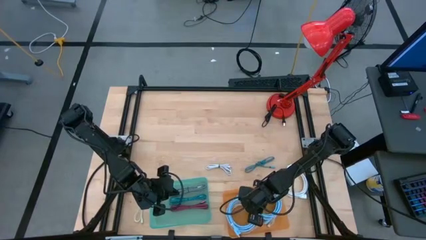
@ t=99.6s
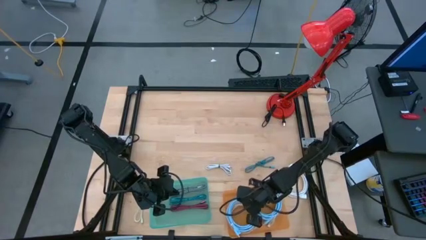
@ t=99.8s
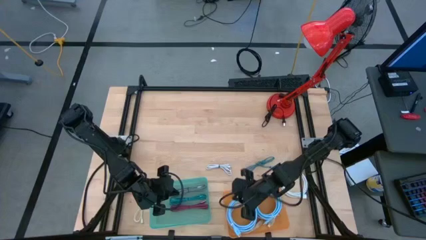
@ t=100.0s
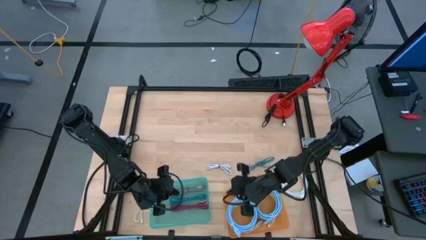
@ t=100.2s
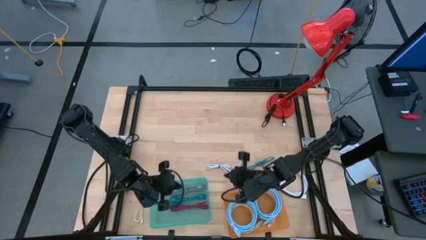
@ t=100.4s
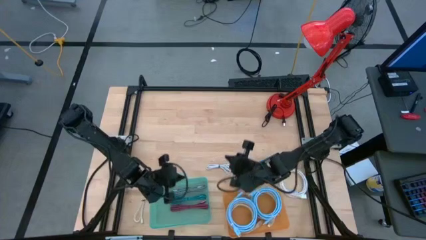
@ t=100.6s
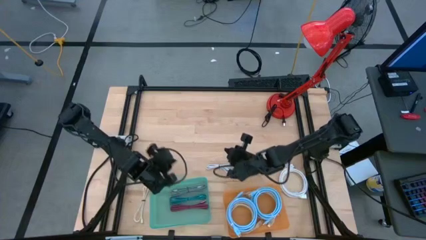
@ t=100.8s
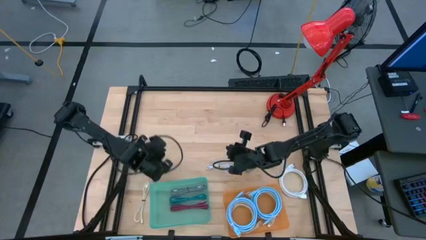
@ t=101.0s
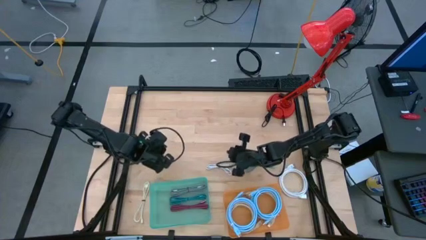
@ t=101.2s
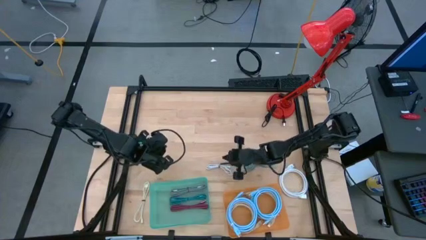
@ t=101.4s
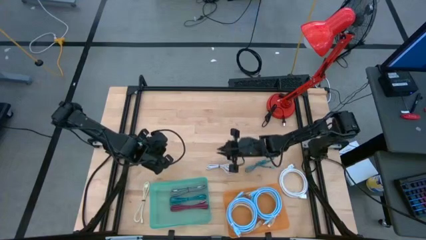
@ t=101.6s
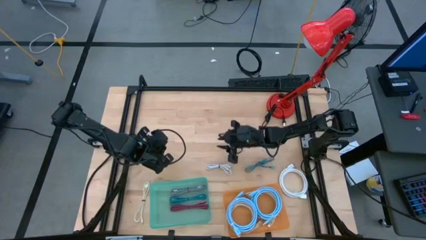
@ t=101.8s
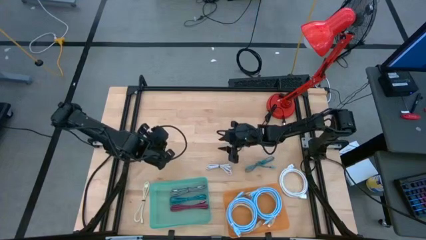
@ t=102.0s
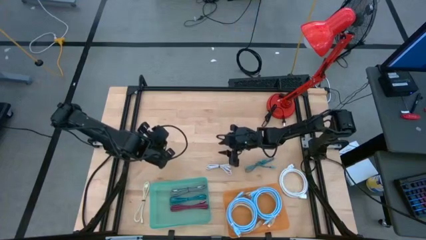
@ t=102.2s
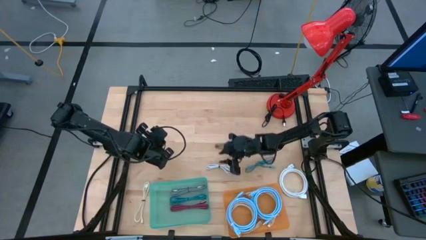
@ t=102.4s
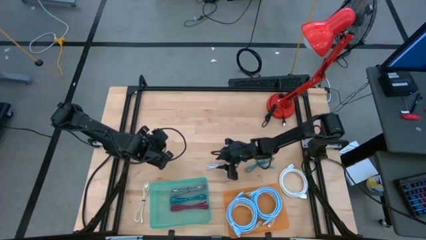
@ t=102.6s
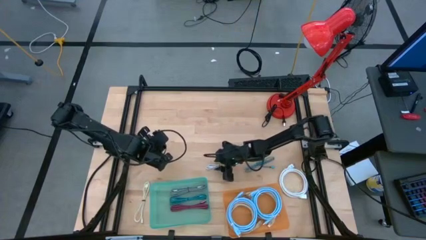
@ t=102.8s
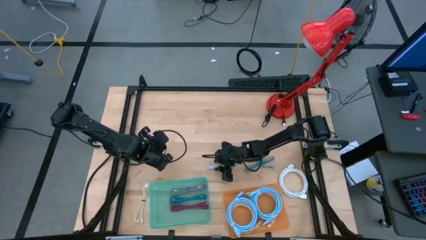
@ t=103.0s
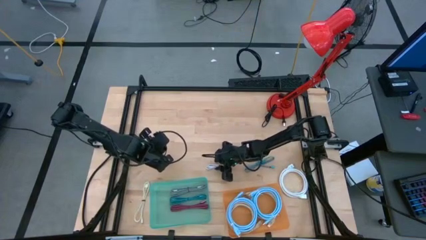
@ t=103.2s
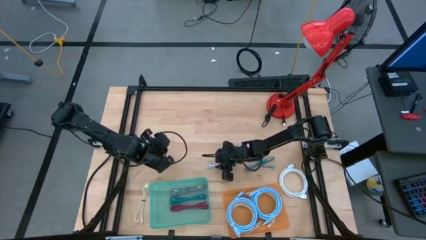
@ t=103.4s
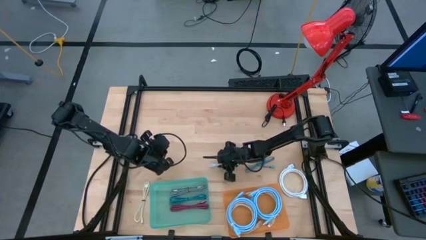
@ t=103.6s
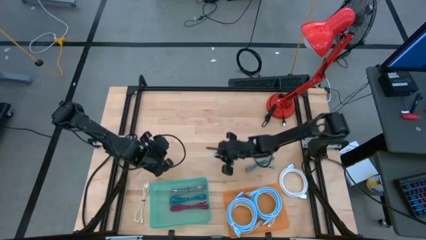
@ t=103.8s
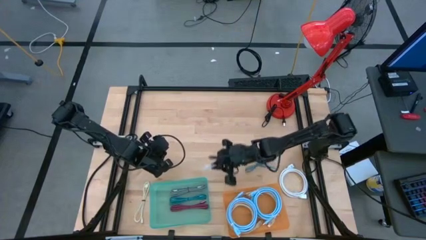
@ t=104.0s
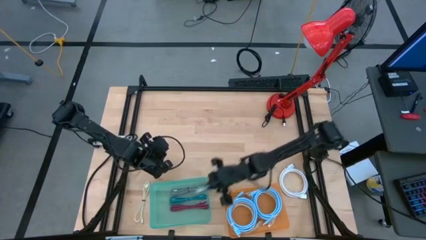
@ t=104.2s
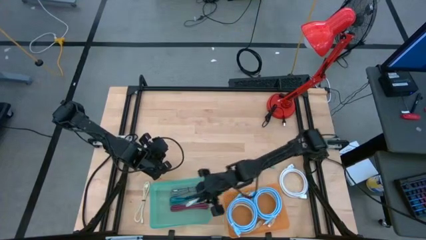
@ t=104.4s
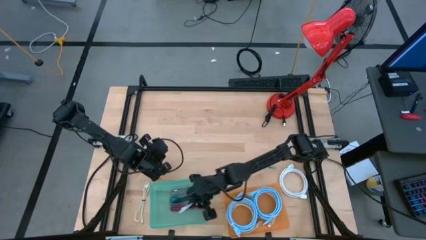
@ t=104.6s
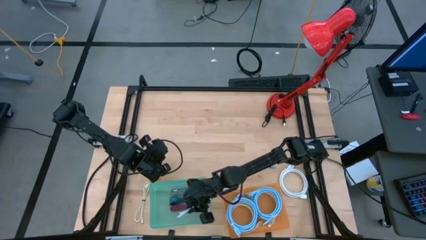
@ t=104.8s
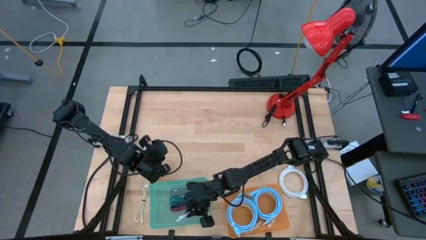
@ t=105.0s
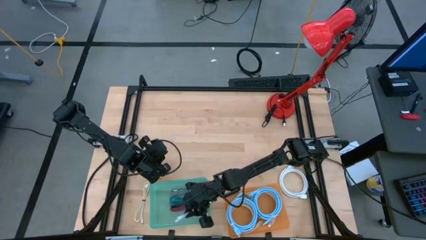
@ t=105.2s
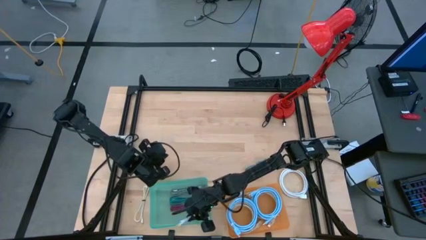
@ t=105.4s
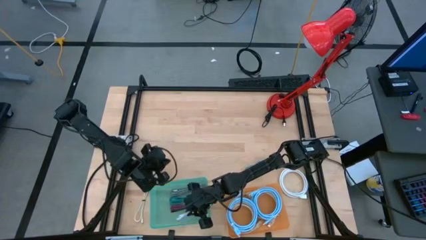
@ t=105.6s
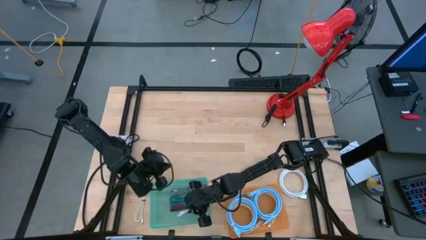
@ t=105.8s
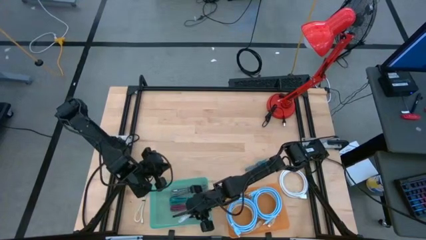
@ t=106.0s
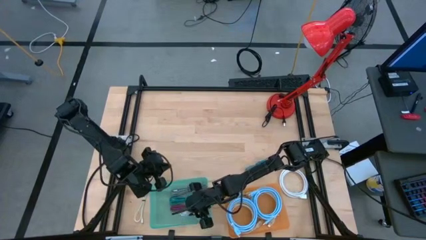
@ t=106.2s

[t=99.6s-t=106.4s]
Task: Pick & Place USB Port
Put the white charger cable into the green bin

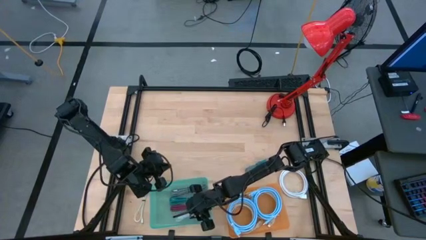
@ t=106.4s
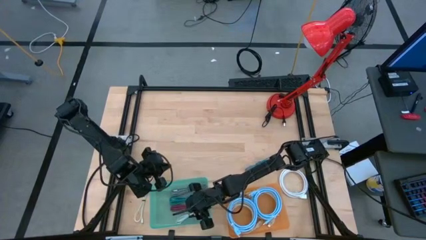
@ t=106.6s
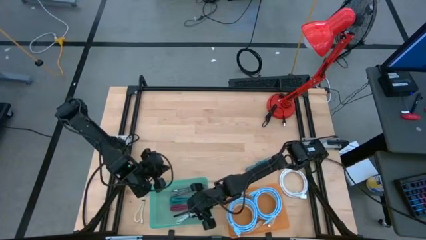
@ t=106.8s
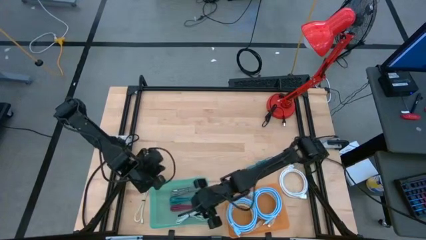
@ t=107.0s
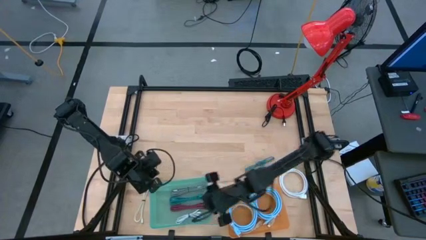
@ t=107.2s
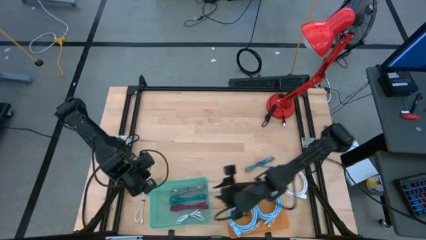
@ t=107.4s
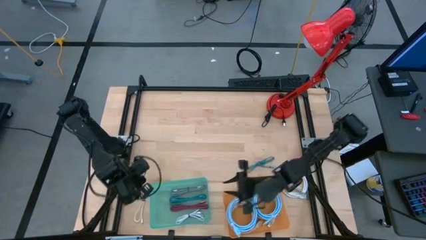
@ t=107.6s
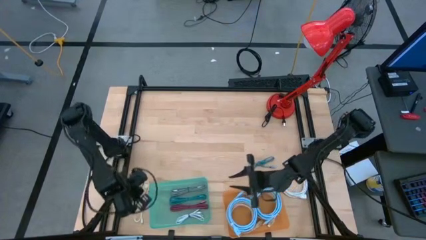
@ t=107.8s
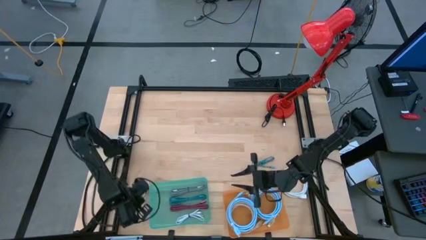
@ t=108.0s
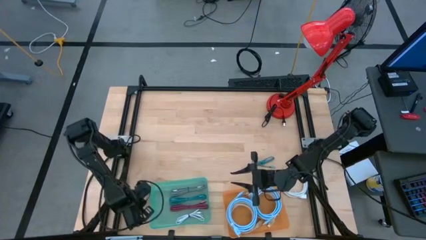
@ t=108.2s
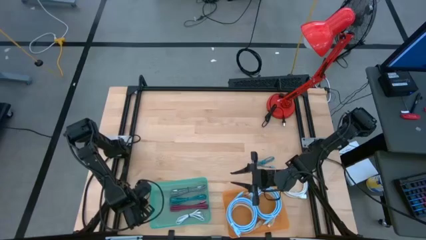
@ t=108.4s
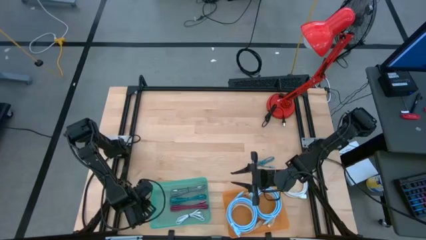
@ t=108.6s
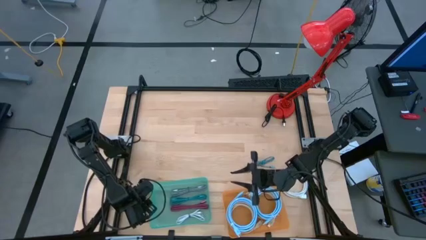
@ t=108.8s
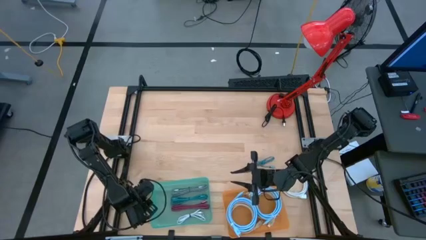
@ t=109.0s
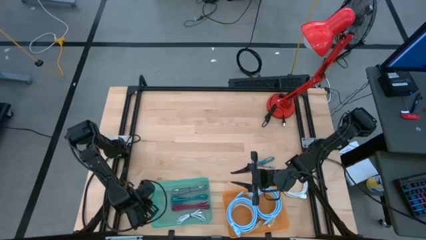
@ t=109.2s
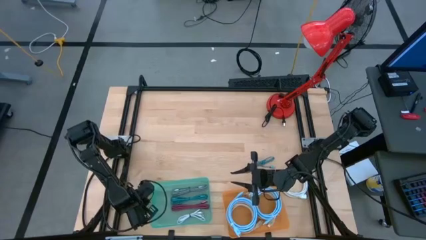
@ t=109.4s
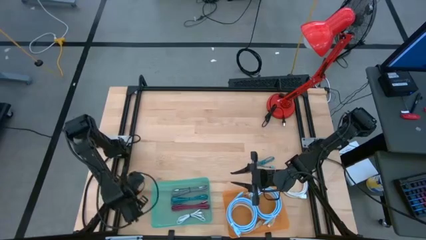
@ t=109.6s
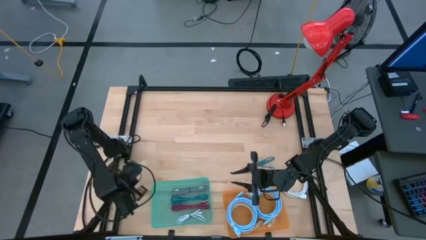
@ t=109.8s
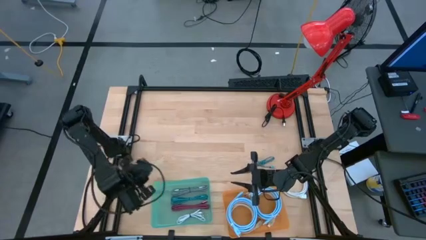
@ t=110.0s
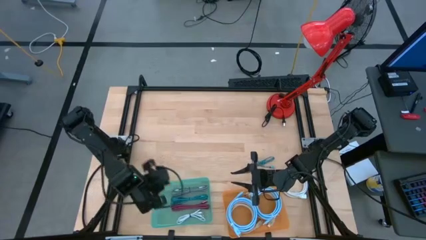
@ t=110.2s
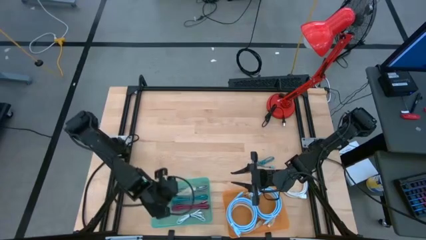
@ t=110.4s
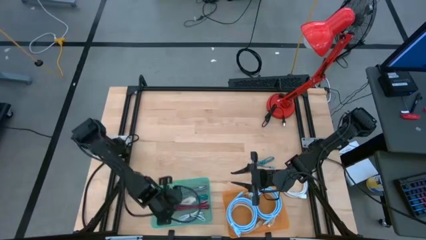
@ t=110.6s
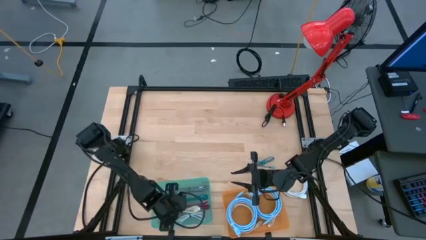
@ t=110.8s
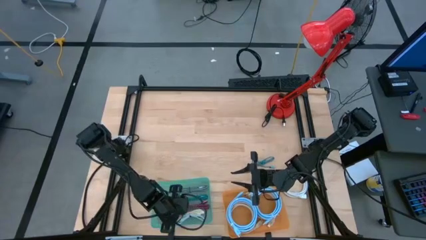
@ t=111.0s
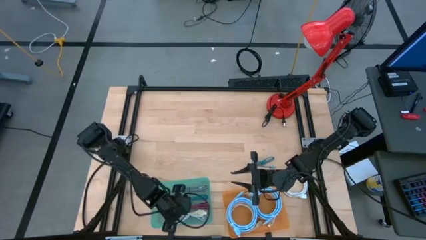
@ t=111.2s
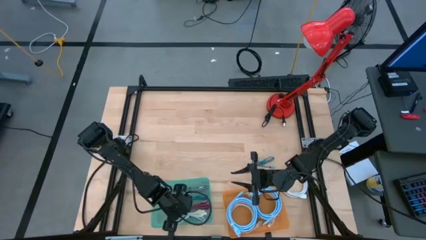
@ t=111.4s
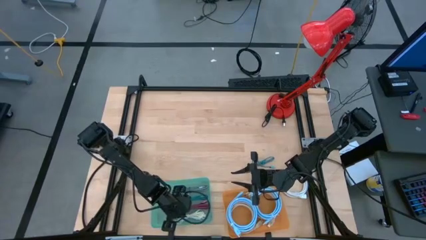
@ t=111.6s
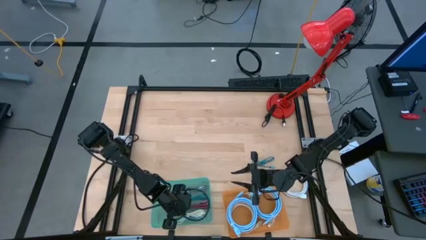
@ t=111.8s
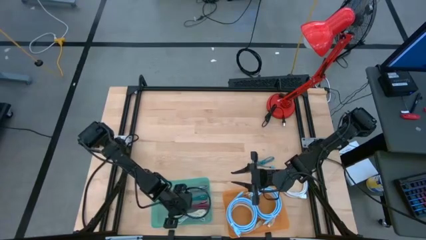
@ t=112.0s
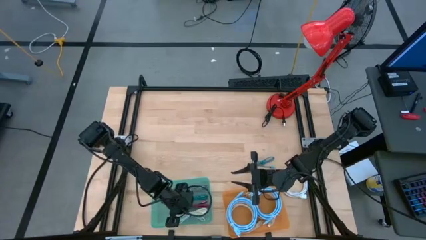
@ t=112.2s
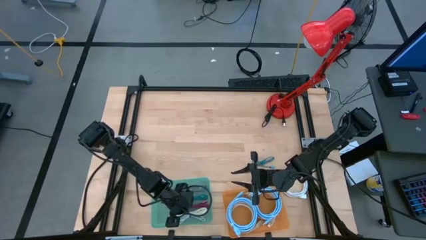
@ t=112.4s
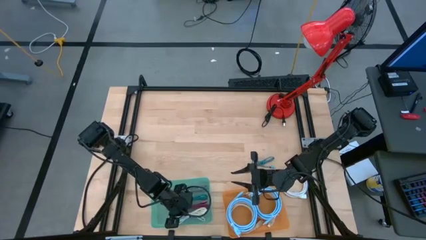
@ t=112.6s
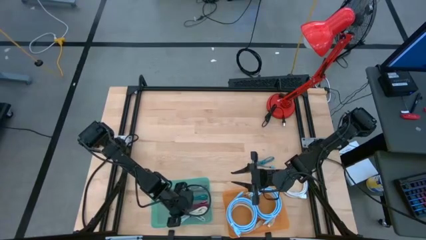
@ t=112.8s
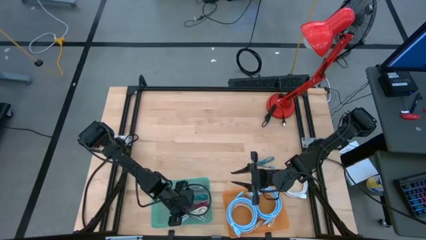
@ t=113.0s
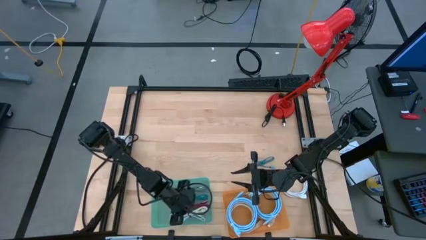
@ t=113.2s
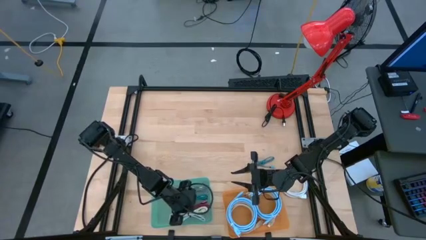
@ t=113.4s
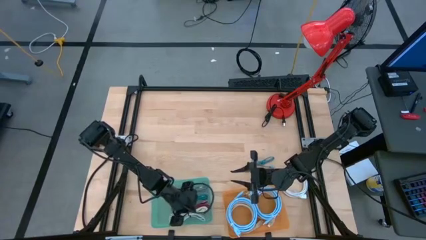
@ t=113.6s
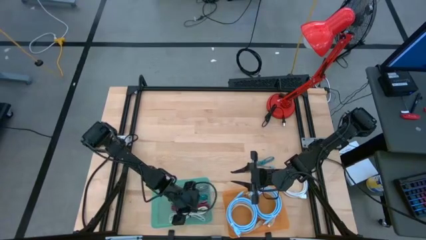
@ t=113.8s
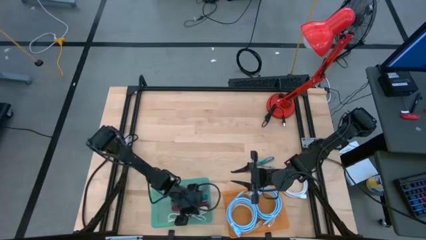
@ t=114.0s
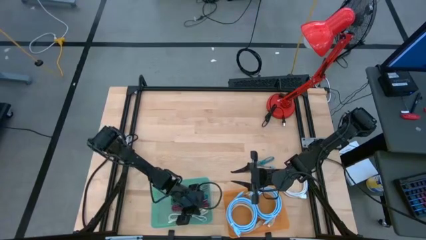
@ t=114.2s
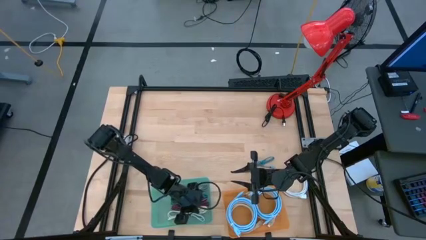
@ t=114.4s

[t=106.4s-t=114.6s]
Put the light brown charger cable into the green bin
